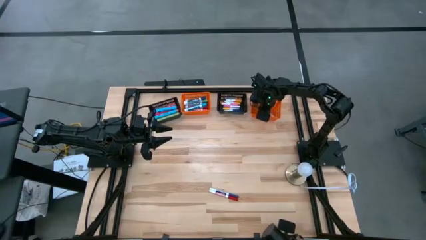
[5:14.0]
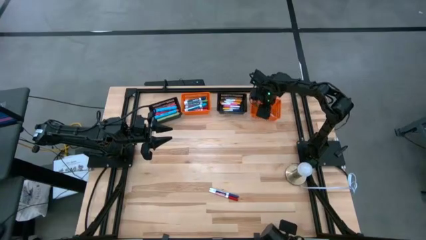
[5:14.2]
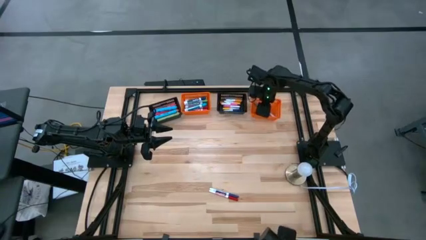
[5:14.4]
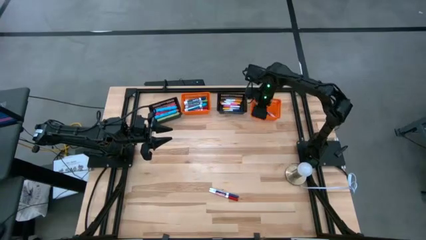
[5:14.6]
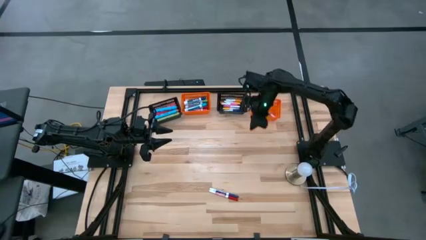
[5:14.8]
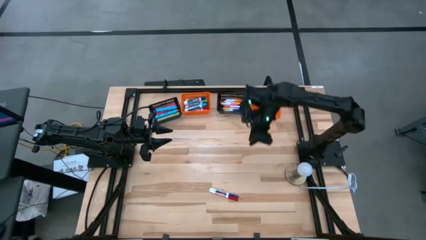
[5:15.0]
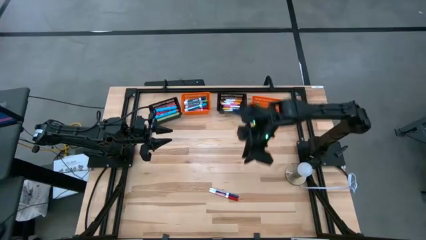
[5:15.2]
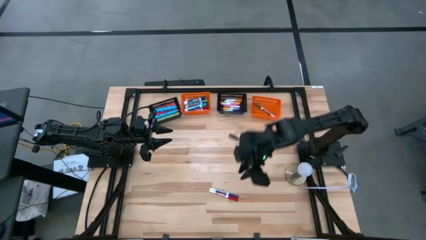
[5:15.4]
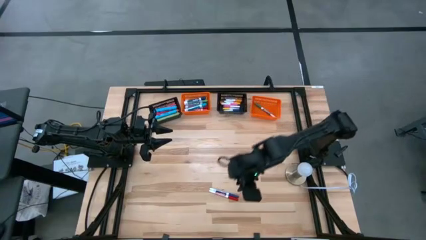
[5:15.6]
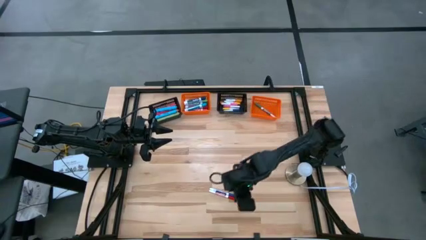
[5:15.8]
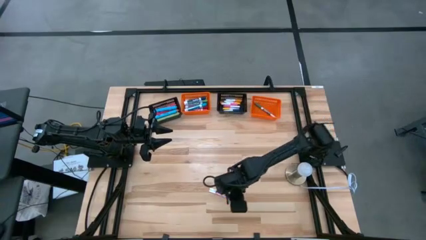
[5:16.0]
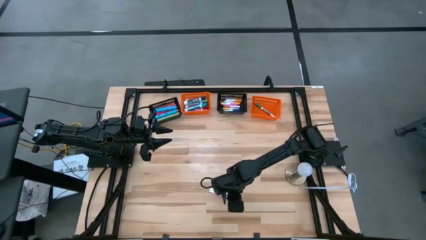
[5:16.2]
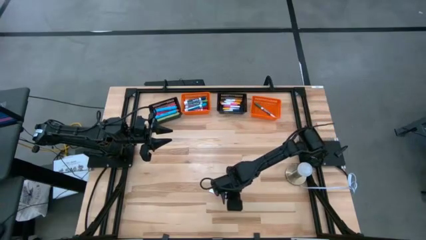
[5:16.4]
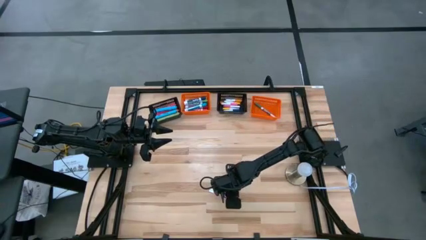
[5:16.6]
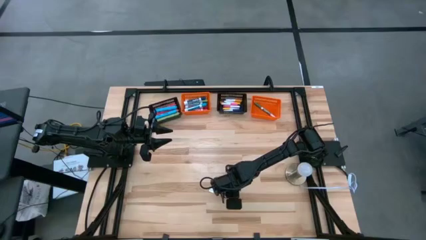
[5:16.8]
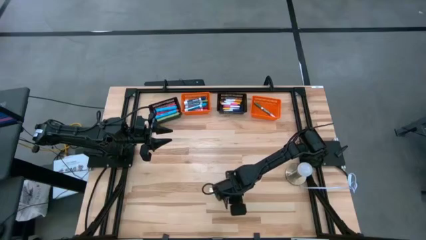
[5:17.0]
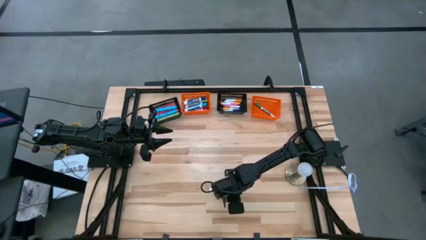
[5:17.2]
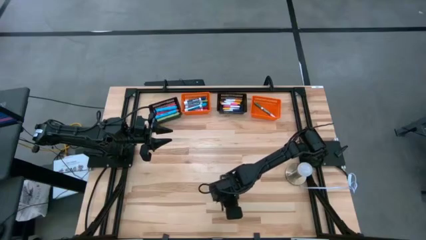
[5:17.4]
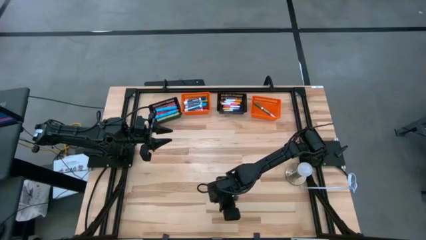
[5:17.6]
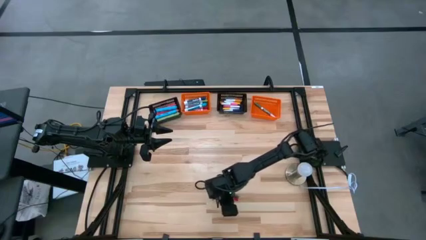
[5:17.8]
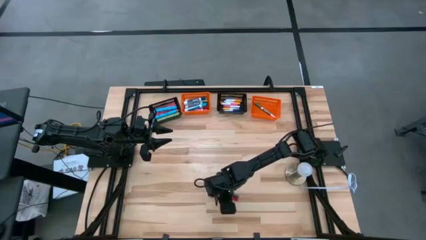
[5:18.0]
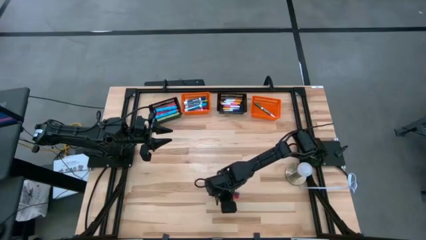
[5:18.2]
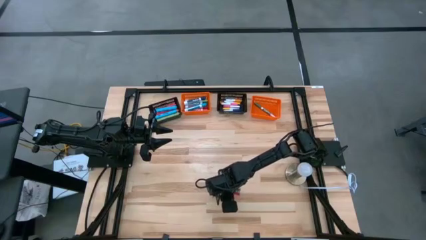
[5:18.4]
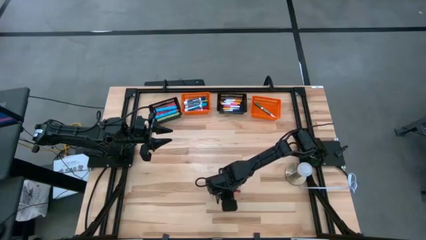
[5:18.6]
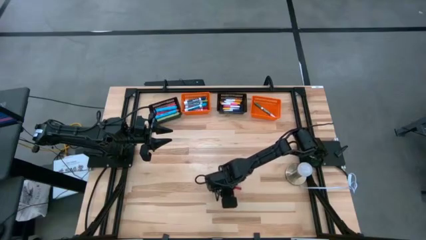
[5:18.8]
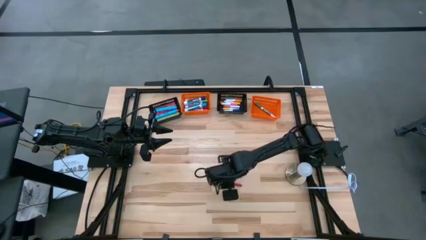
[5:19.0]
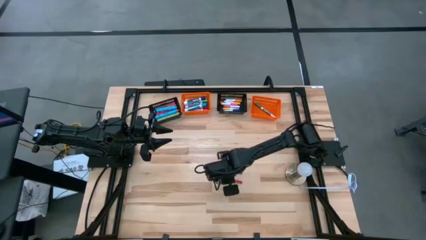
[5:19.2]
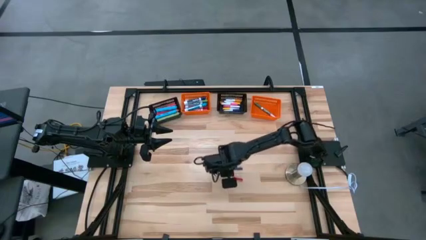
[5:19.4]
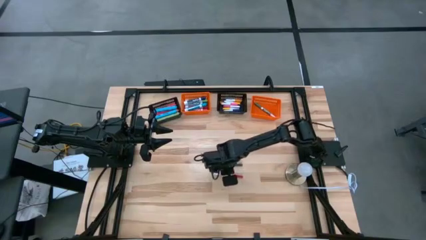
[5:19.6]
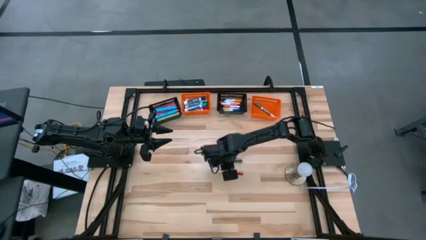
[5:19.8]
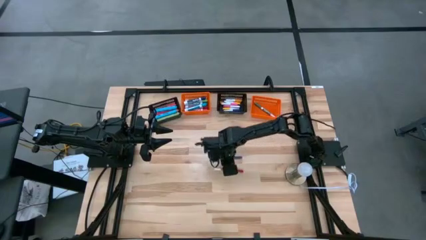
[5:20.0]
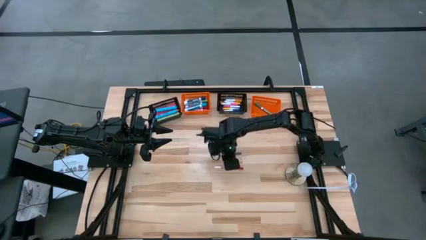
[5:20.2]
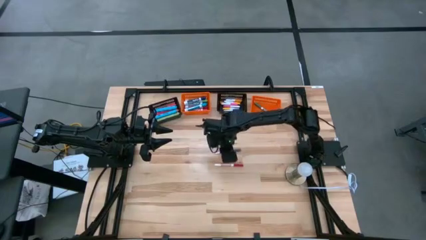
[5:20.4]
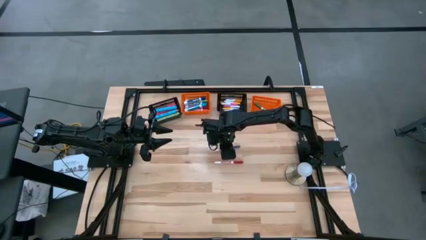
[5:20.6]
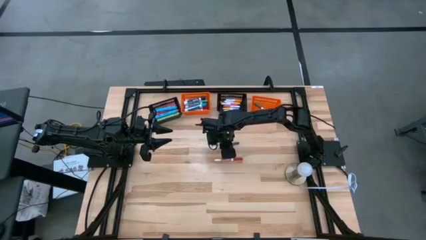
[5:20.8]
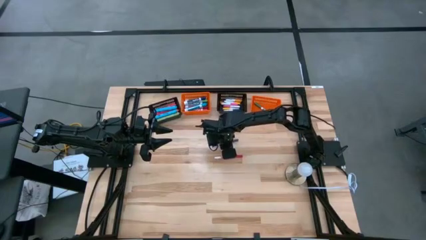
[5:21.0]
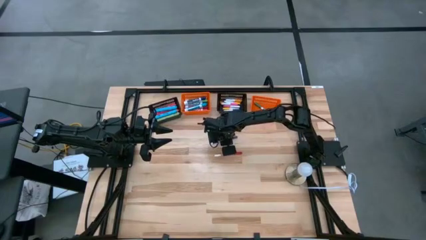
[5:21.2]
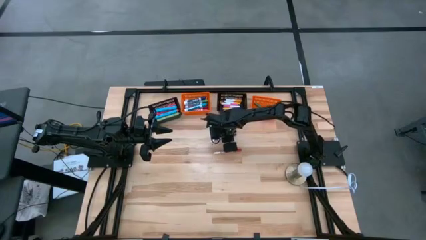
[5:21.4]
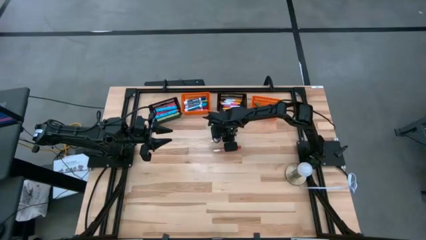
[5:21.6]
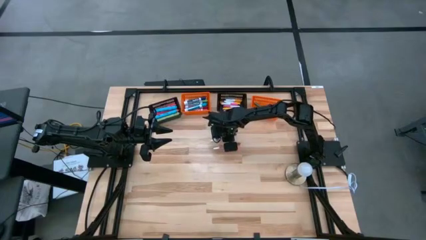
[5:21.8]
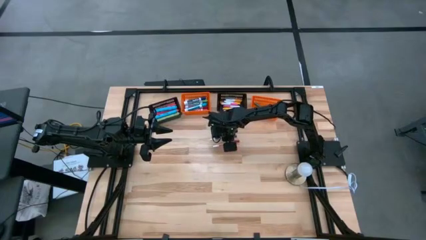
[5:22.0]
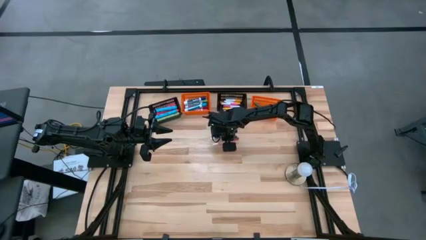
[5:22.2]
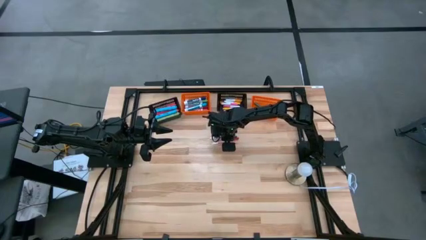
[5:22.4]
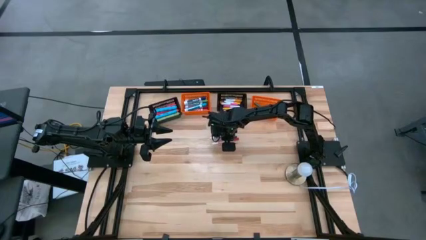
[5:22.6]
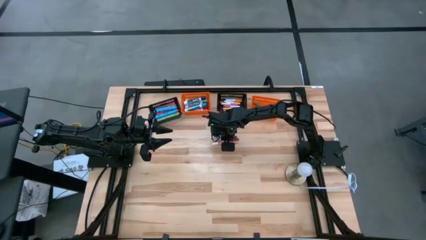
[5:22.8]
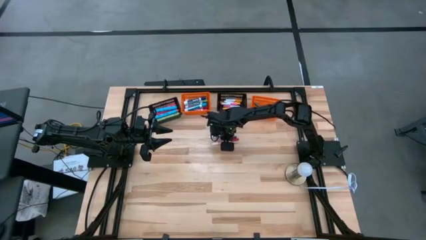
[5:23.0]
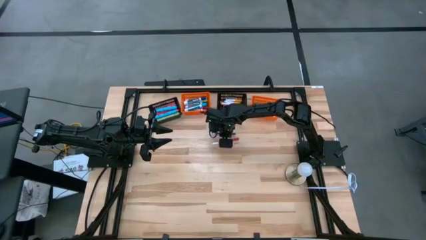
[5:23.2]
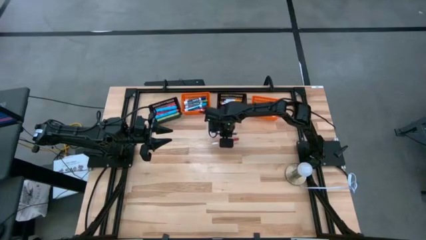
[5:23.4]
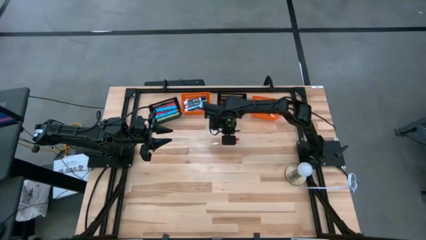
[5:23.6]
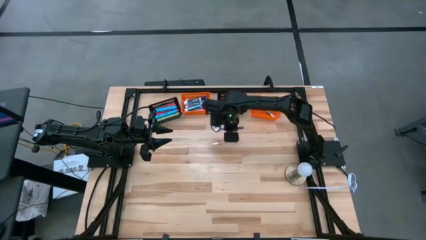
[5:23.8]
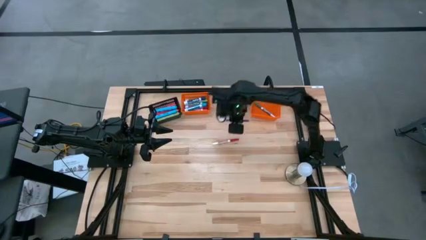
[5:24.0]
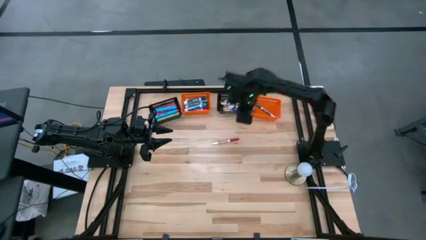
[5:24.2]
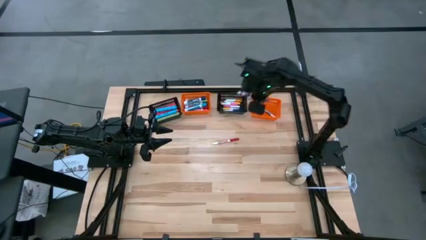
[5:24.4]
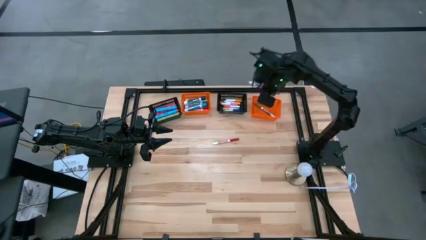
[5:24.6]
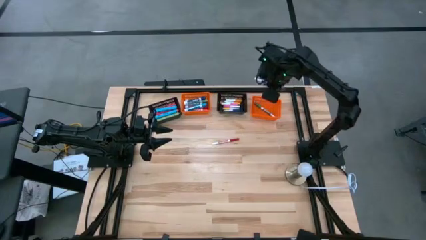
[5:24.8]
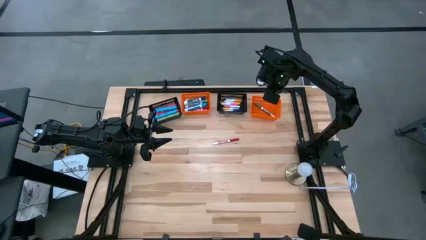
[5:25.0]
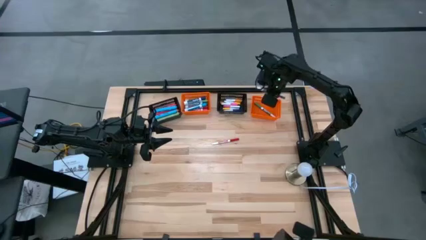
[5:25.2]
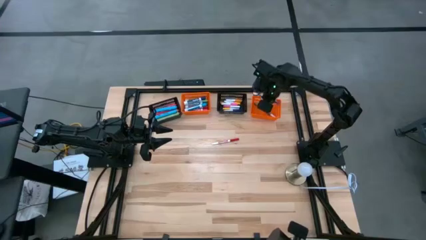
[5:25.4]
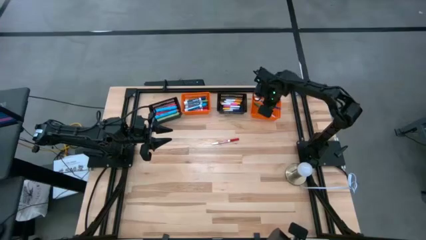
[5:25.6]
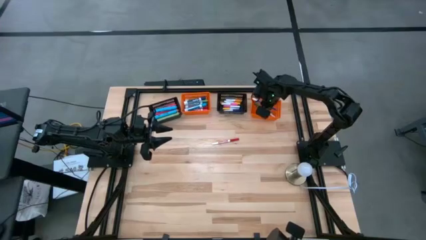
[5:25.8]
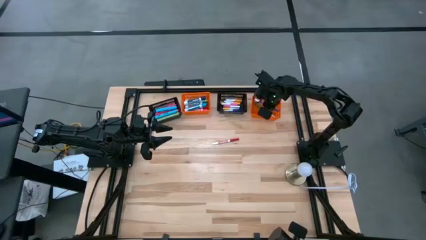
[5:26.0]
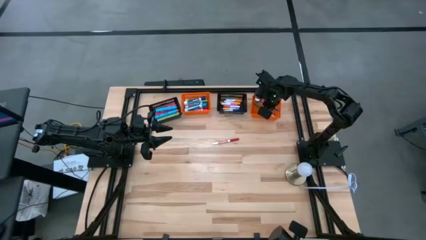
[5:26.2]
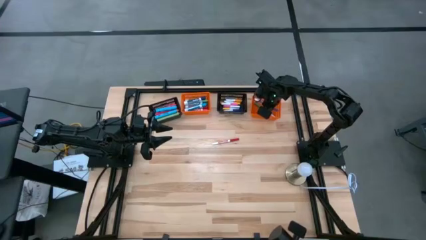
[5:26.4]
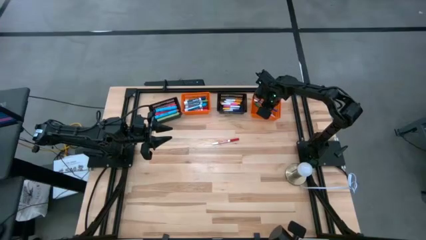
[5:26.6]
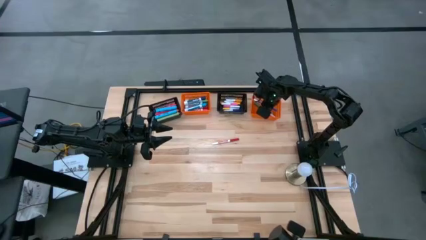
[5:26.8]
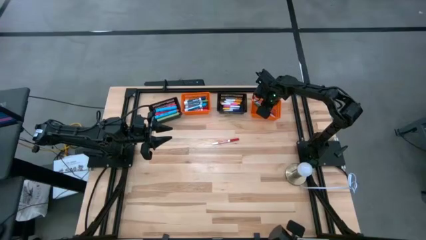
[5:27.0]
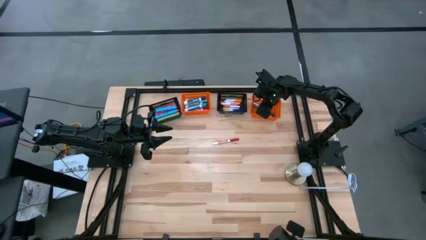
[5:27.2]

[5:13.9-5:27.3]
Task: Pick & Place Markers
Put the thin blue marker pen into the right orange bin

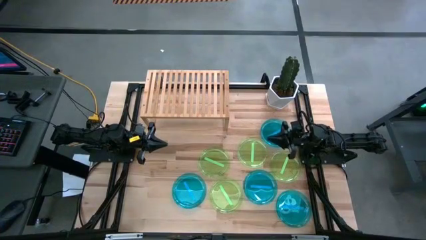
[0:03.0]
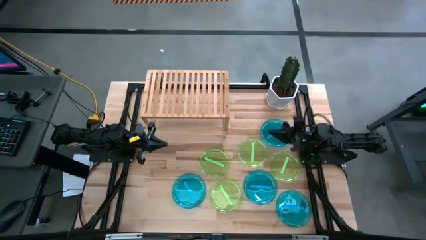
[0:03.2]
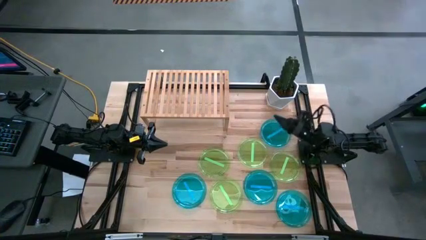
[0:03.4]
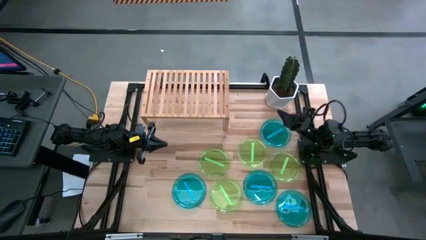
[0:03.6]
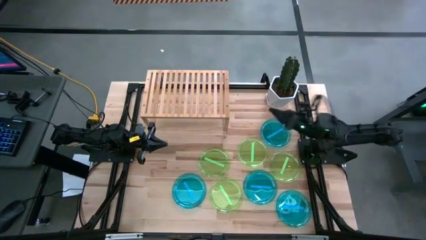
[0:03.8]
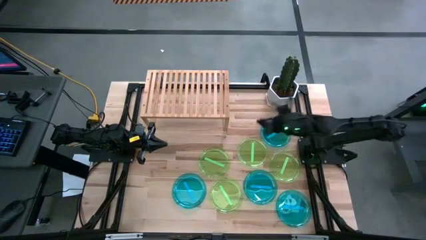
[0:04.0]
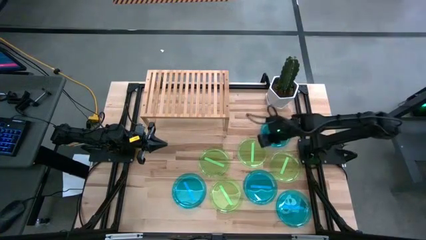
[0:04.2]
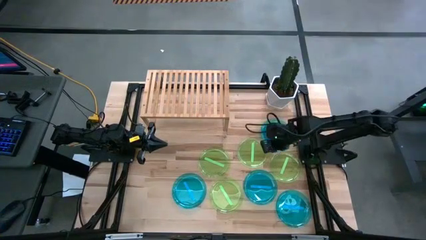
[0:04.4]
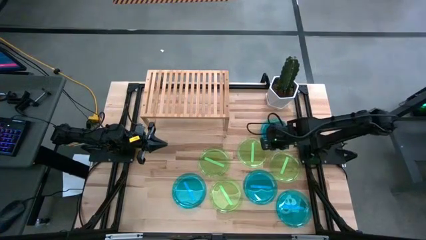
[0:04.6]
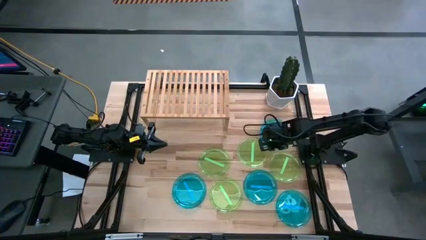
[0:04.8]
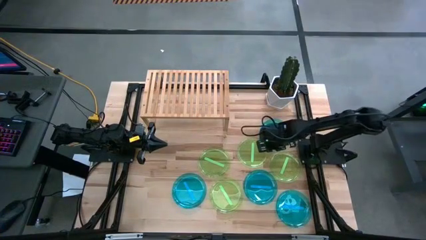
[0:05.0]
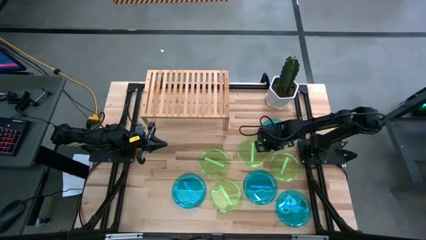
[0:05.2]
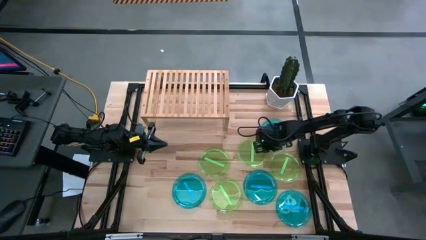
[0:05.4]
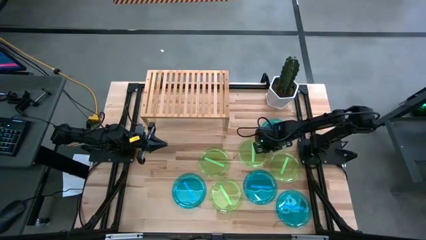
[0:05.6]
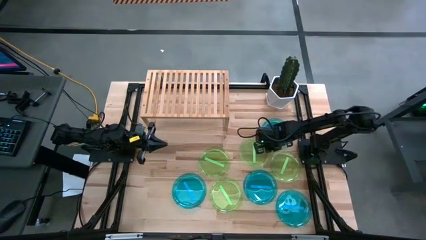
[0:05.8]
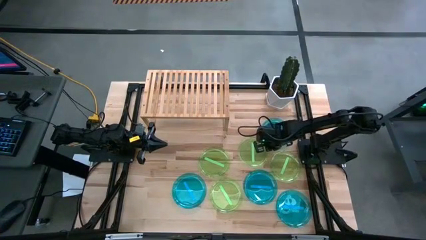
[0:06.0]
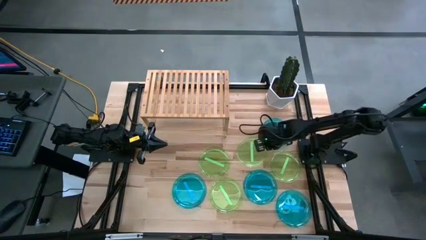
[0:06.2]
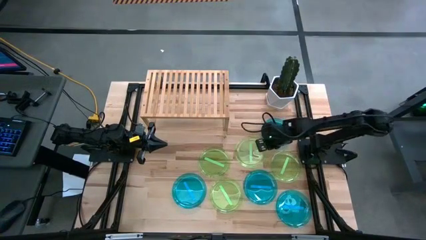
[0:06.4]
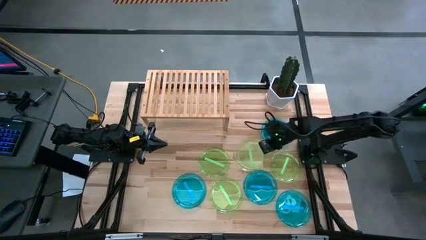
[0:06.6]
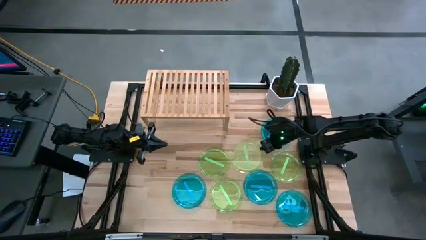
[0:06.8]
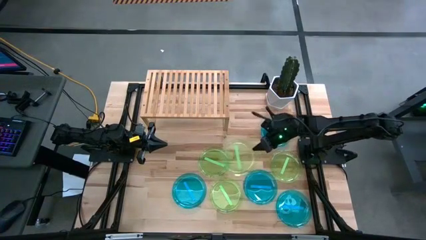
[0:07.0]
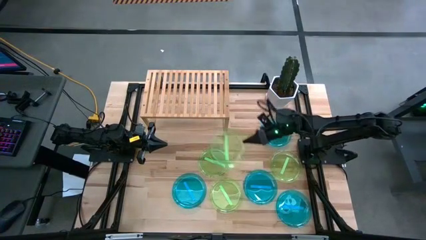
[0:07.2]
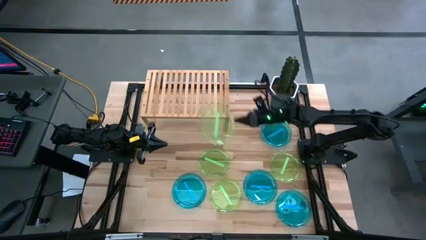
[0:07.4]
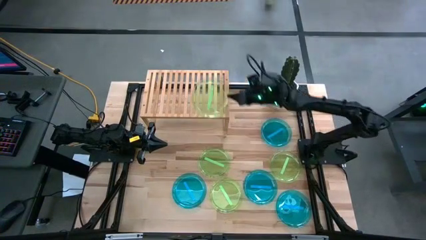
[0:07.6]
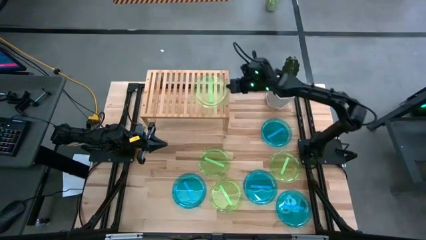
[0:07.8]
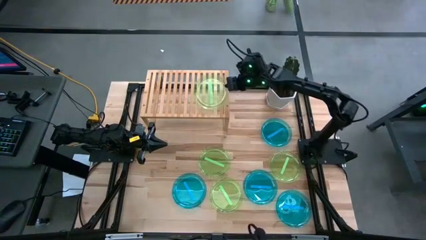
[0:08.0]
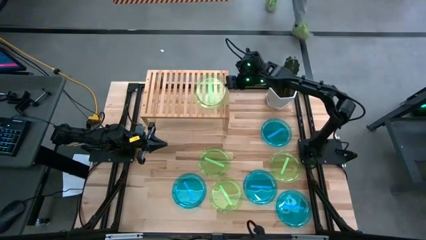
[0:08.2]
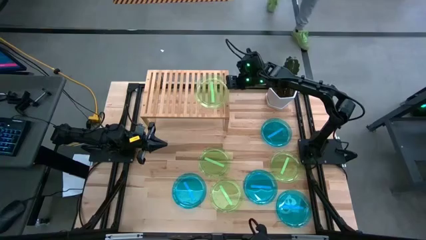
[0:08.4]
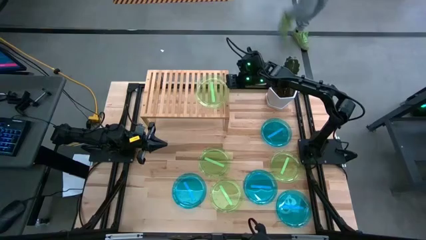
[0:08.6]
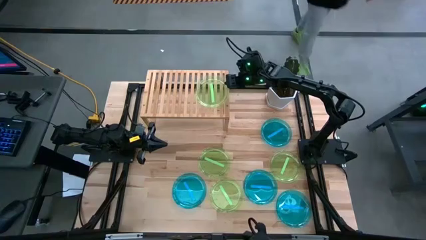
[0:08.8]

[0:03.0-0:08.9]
Task: Place and stack plates onto a shelf
Put the green plate on the shelf
